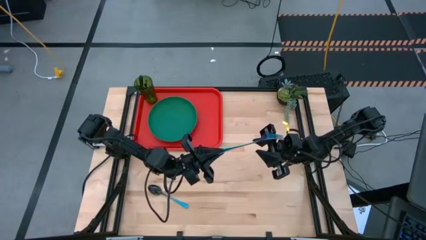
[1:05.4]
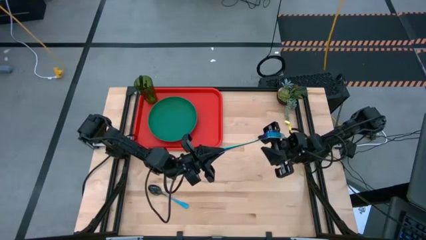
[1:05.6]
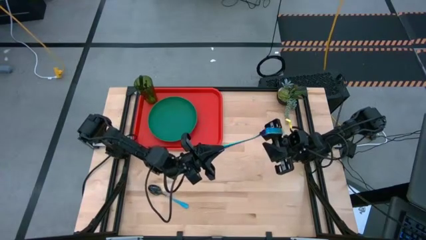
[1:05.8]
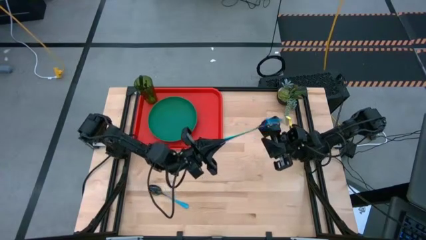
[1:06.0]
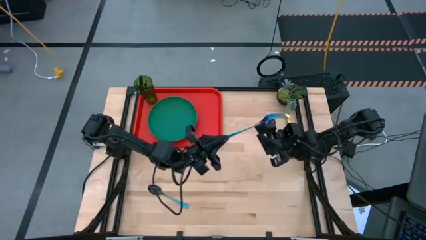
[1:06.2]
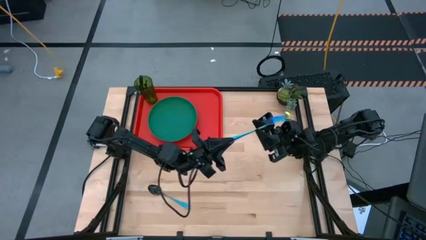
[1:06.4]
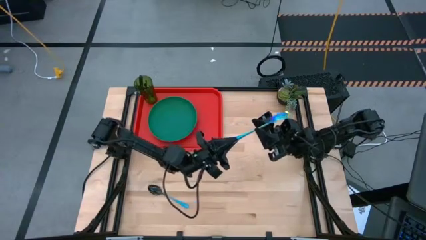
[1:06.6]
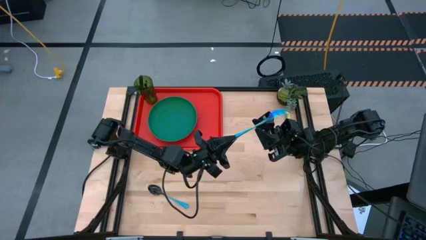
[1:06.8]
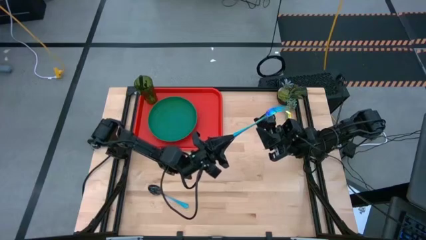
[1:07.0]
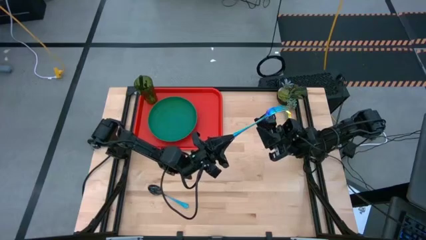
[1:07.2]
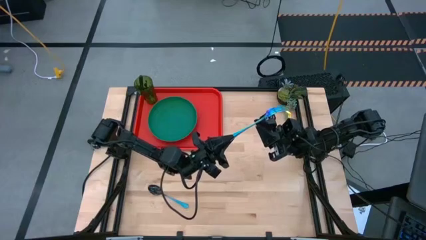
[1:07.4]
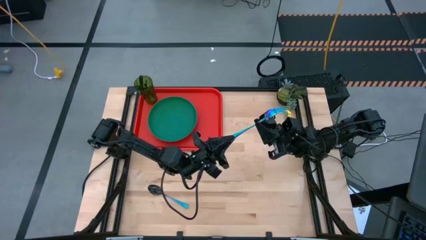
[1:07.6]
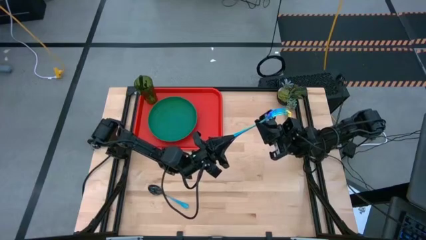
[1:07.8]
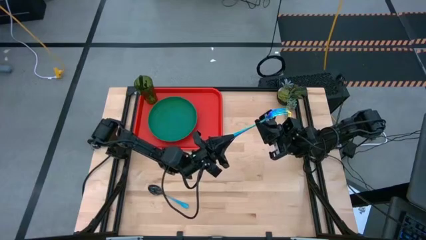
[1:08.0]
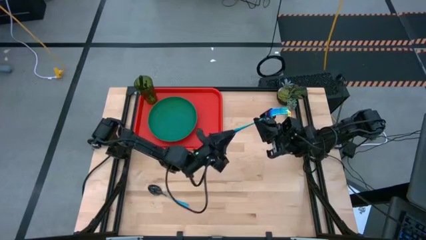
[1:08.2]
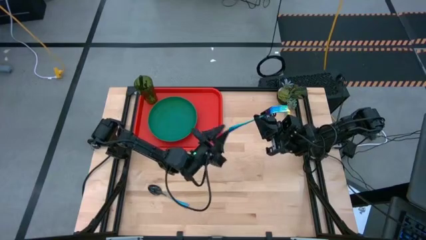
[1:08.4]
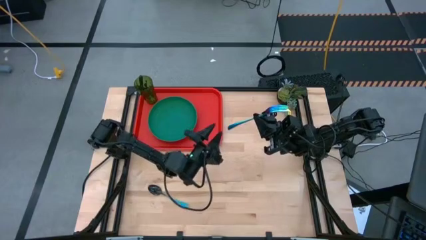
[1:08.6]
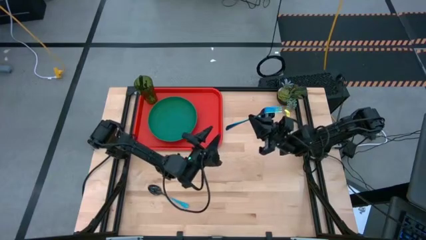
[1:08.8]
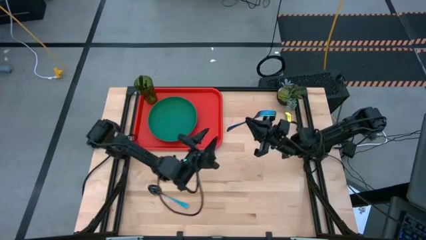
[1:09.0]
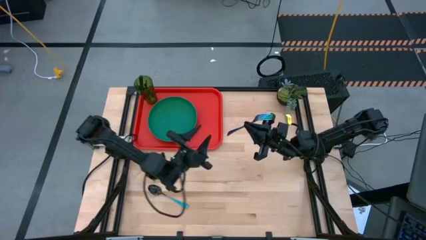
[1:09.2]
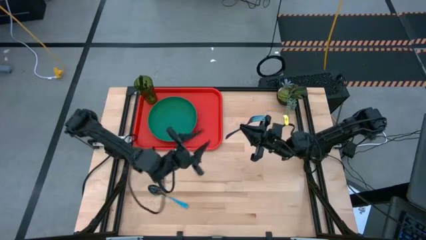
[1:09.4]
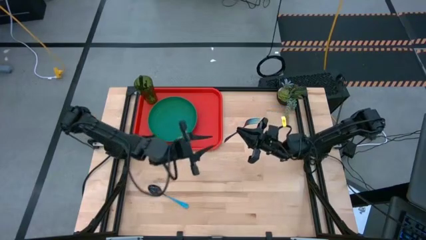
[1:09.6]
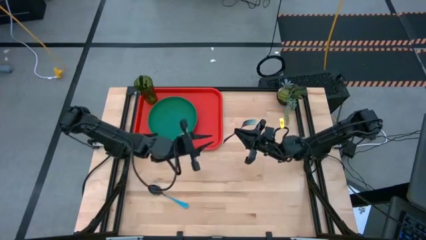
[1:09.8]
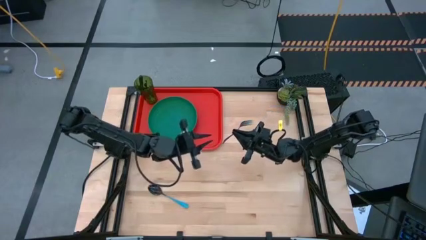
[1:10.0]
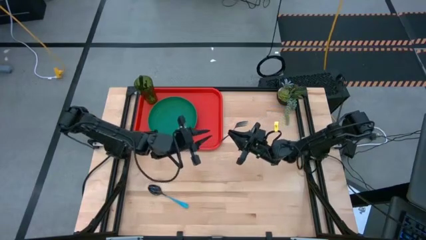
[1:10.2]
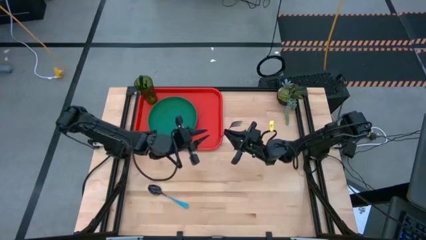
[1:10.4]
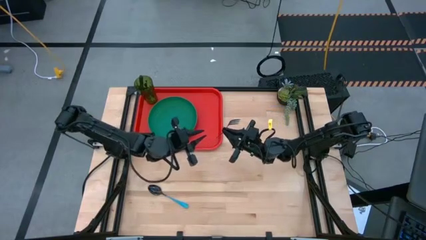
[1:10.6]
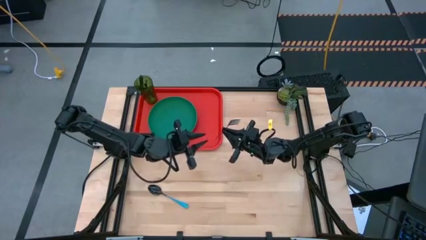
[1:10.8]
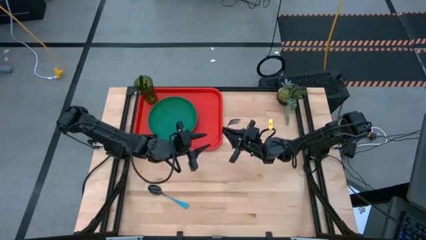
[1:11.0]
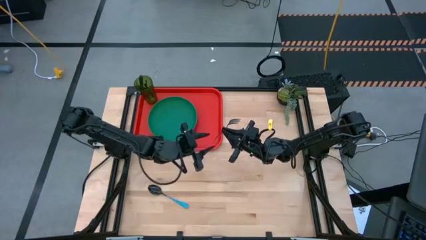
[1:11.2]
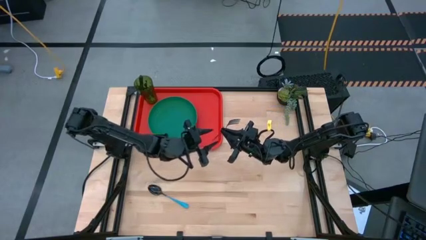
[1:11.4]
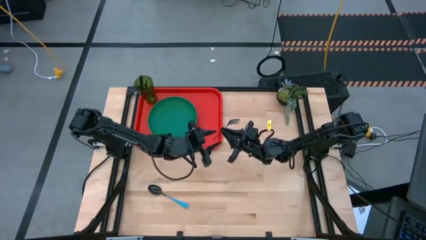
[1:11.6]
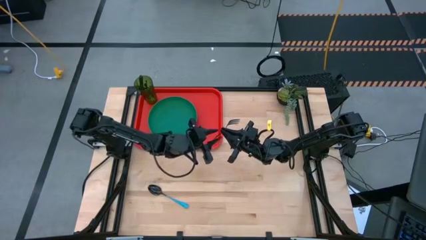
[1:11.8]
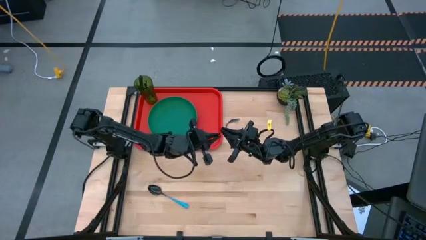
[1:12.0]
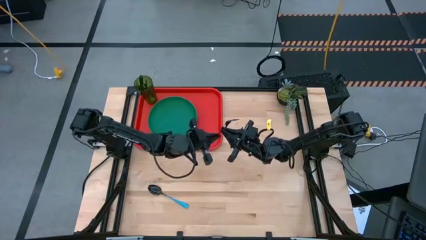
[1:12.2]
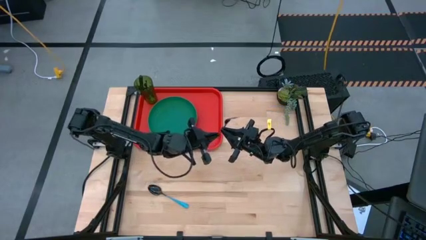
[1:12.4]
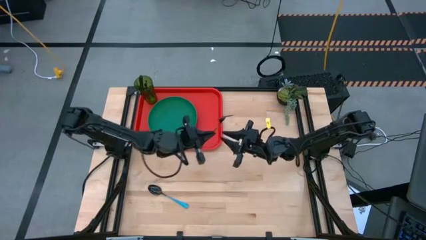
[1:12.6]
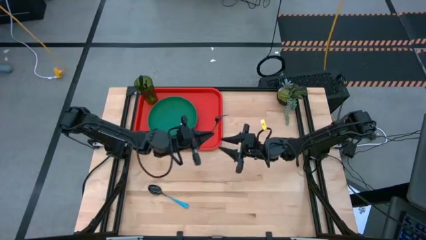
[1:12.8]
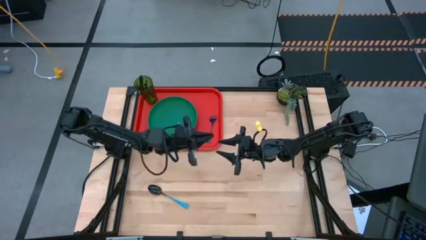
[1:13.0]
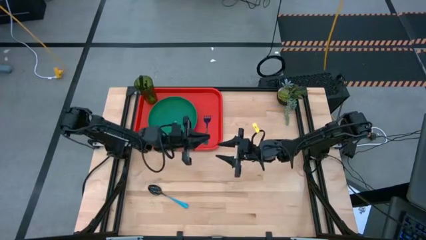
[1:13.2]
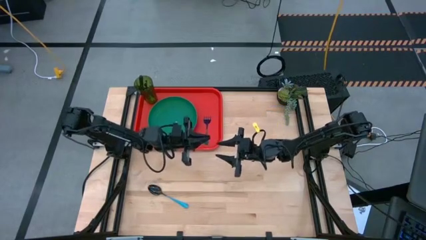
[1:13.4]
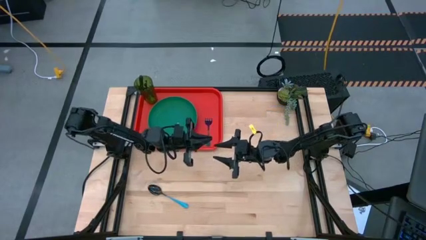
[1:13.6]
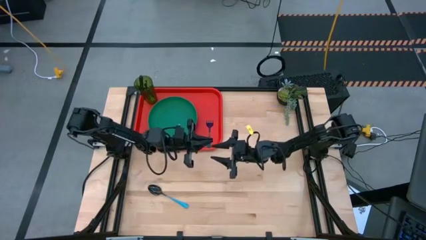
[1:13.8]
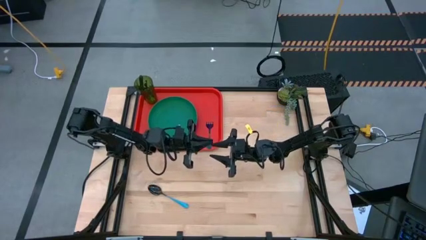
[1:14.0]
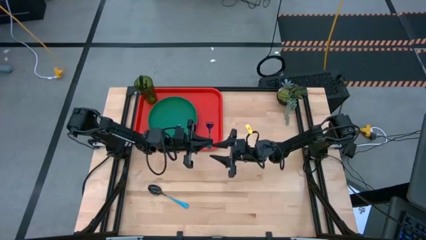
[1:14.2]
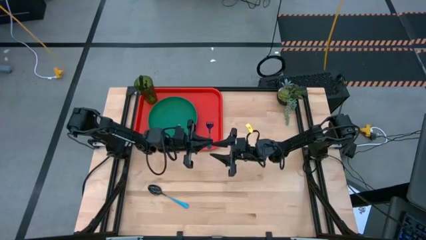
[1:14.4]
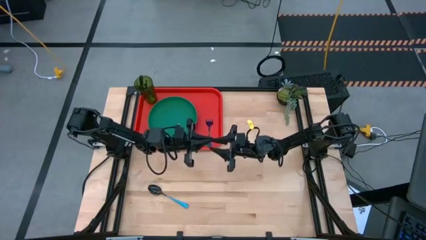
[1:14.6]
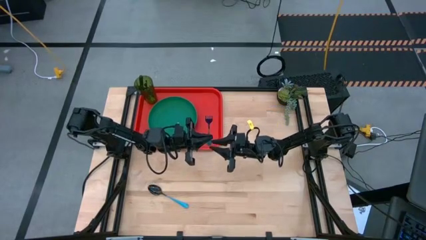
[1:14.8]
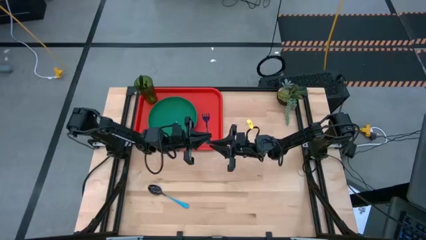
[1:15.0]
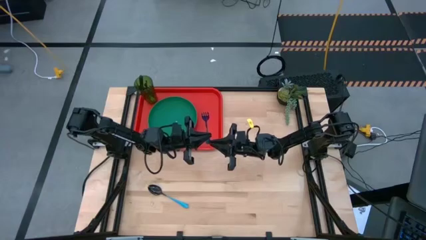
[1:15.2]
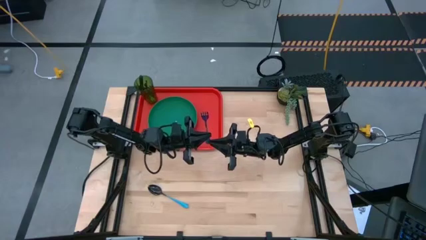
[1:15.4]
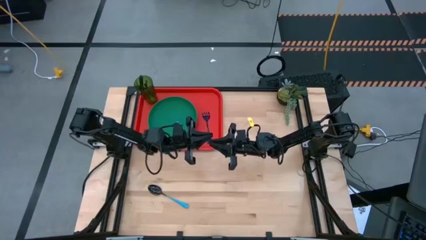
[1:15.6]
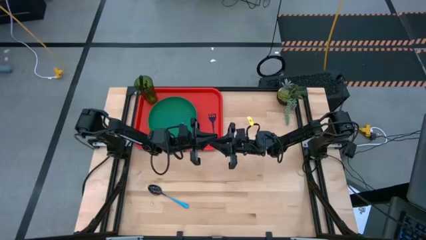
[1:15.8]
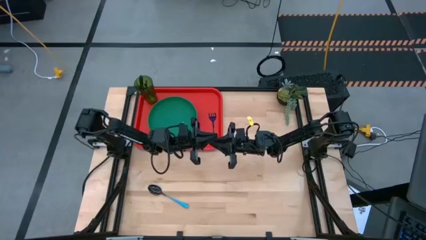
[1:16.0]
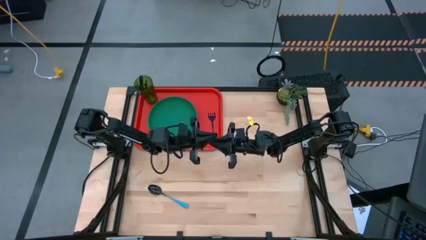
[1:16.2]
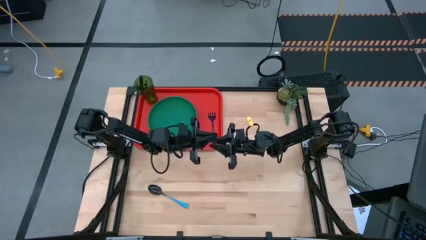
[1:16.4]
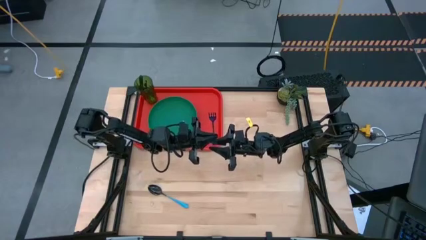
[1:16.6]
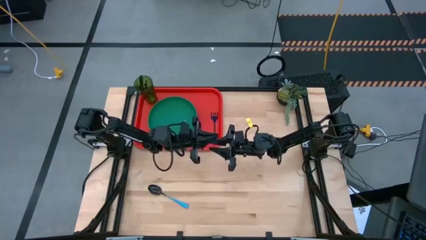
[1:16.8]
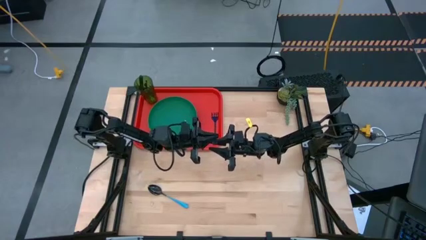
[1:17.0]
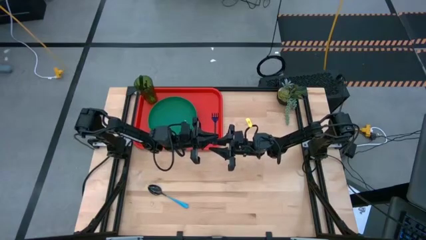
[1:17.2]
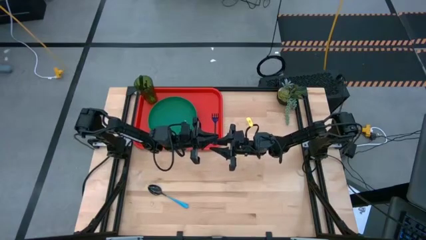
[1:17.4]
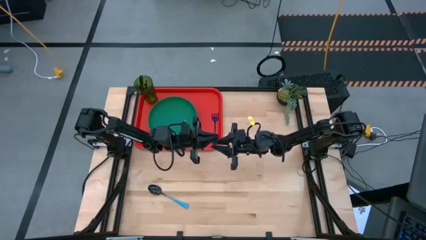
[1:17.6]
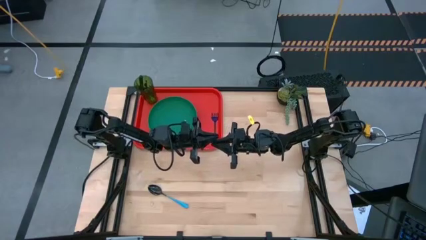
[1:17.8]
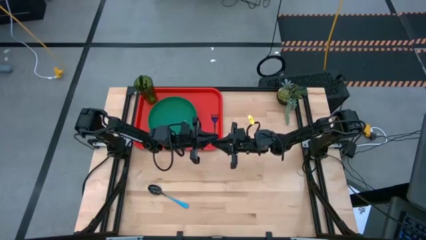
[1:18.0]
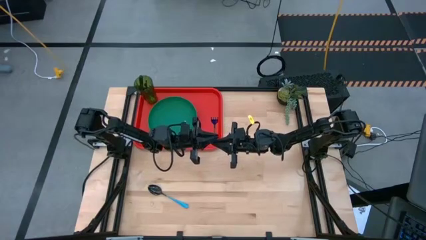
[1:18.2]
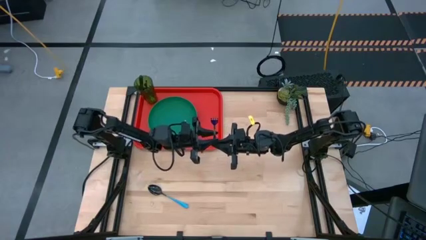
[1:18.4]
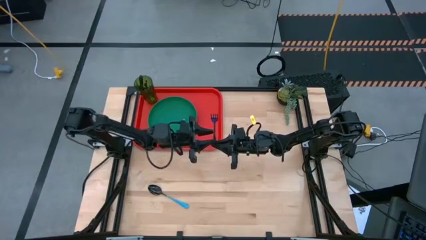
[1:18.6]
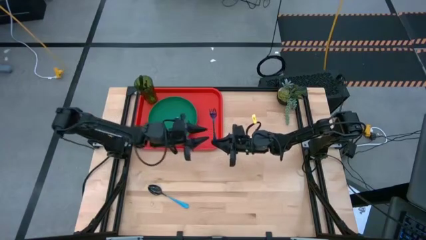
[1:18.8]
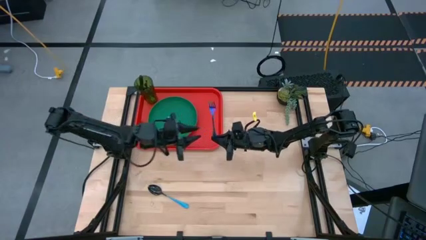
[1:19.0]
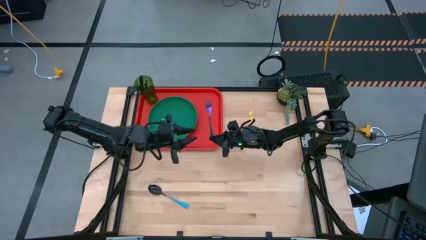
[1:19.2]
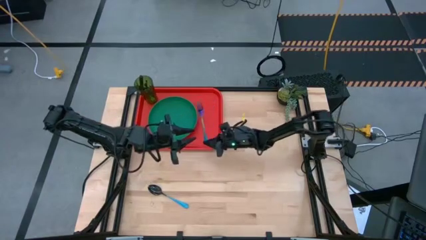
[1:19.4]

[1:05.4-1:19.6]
Task: Pick and place plate/cup/fork/spoon on tray
Put the blue fork on the orange tray to the right side of the green plate

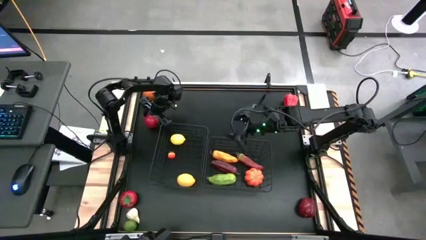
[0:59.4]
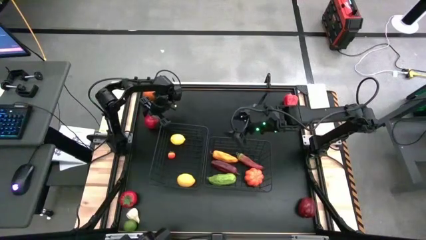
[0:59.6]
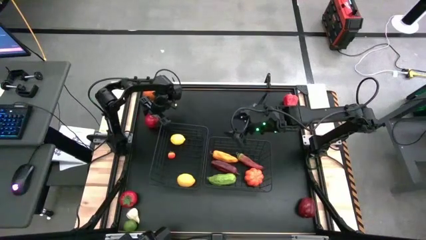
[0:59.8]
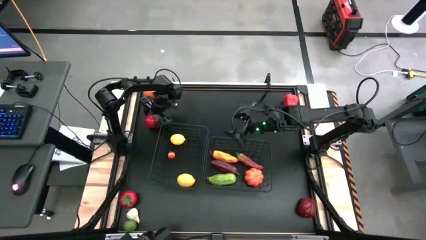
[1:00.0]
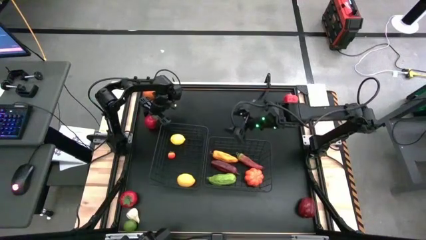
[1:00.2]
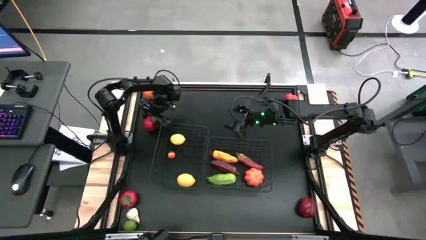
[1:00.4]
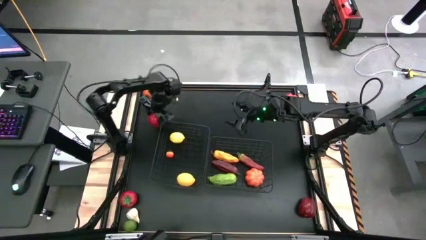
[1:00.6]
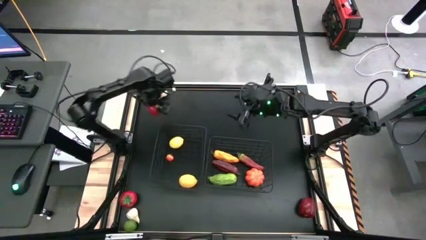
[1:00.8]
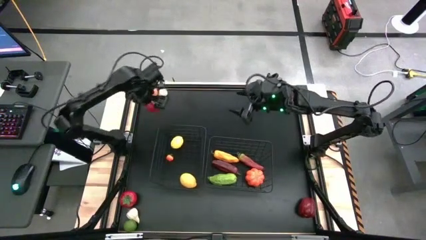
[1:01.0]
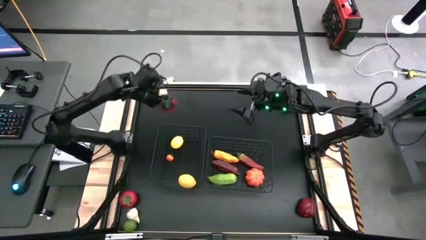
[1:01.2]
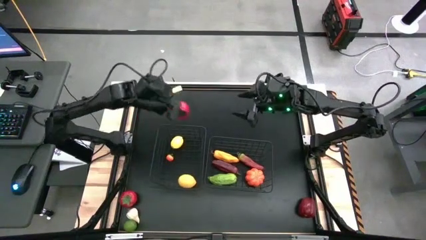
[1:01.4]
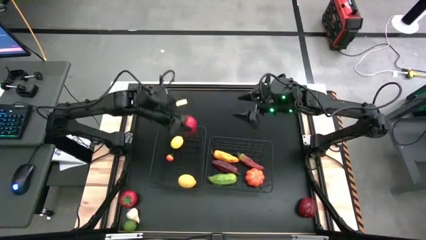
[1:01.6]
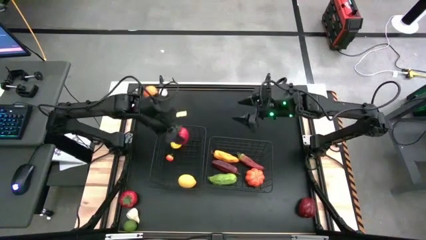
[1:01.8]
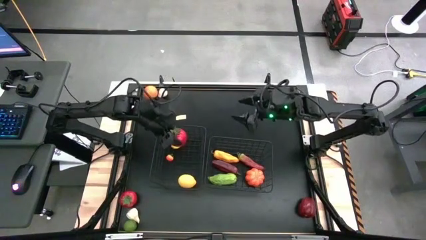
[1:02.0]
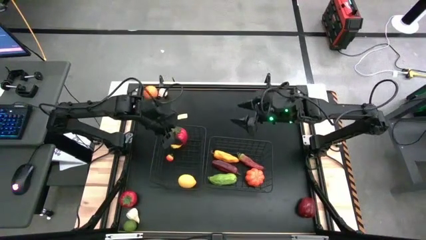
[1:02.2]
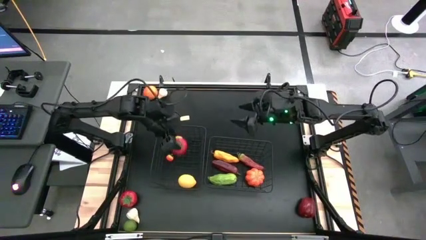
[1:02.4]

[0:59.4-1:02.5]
Task: Sort produce into baskets
Put the top red tomato into the left wire basket

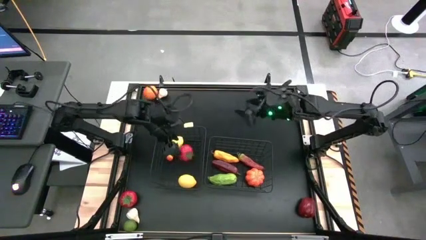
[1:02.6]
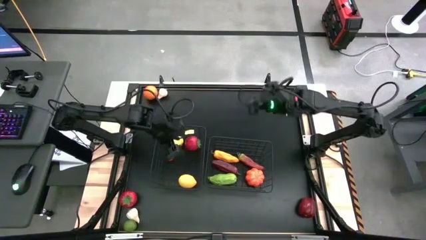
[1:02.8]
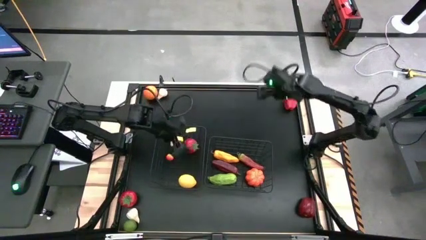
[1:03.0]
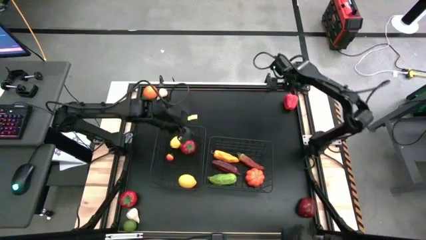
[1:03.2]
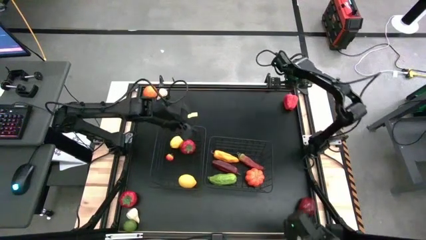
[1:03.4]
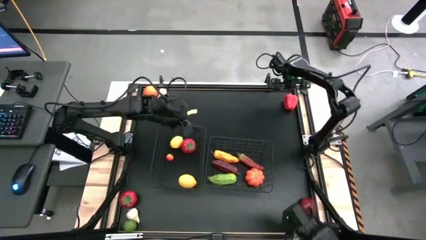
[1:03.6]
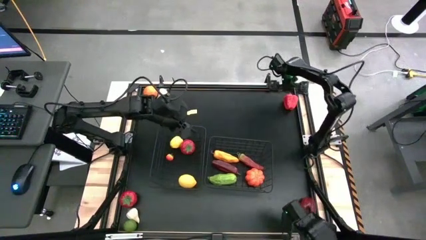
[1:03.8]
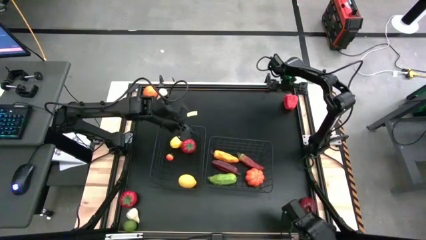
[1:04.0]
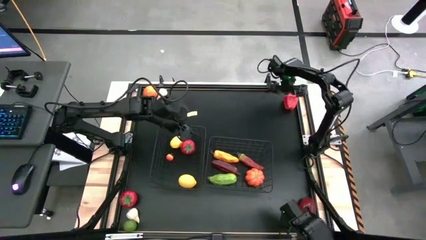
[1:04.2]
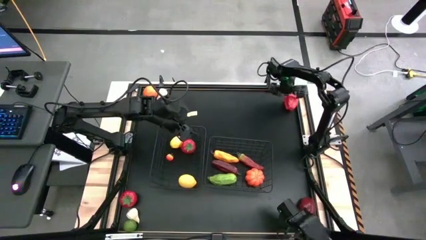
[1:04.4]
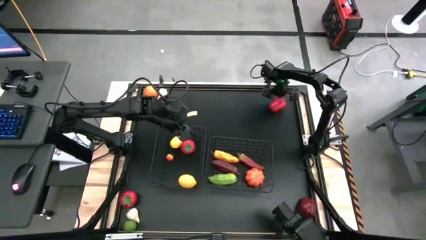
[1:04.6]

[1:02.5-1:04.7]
Put the red bell pepper into the right wire basket
